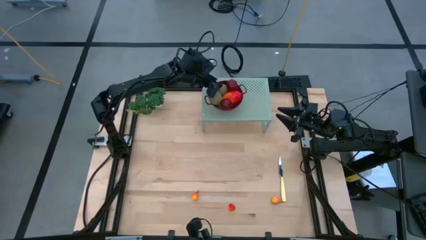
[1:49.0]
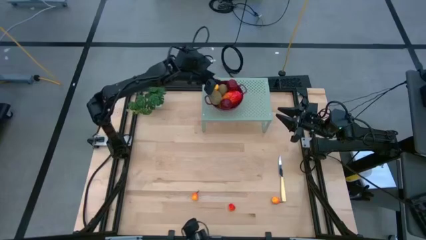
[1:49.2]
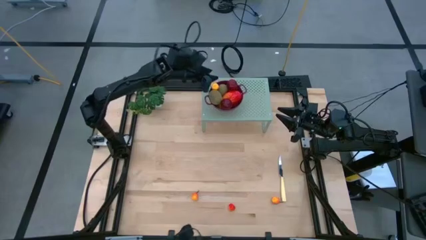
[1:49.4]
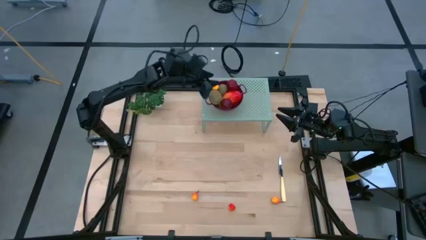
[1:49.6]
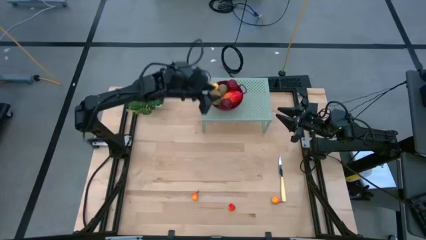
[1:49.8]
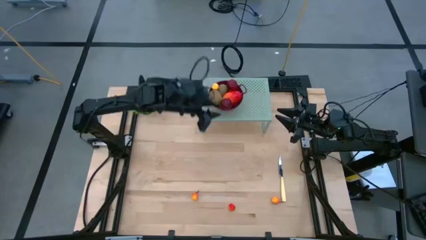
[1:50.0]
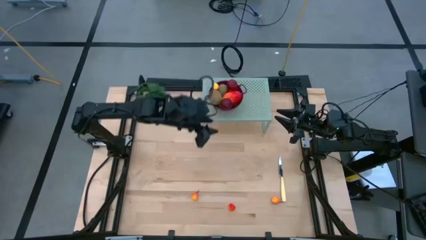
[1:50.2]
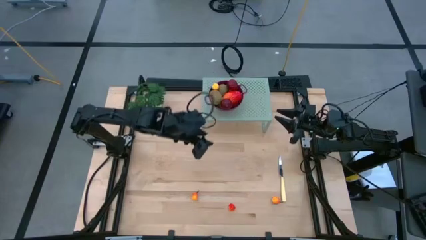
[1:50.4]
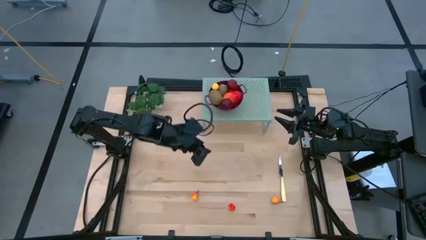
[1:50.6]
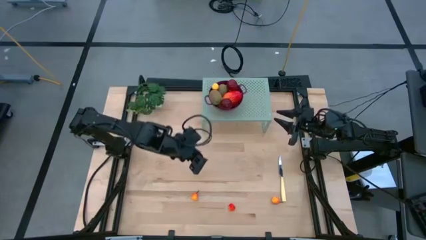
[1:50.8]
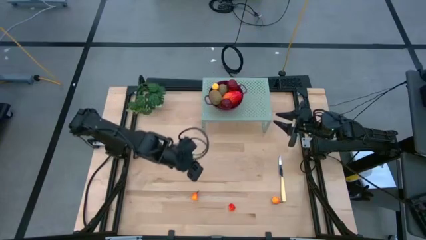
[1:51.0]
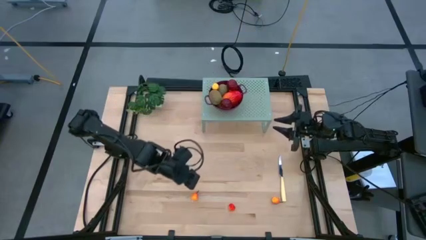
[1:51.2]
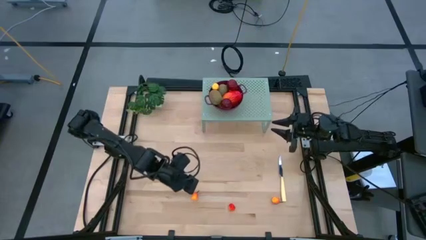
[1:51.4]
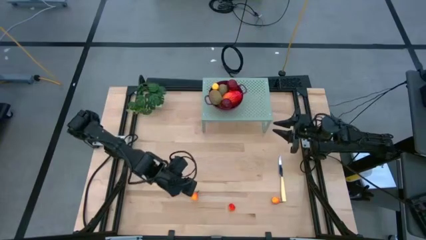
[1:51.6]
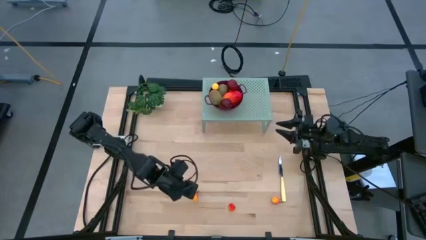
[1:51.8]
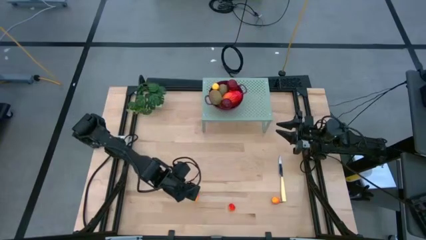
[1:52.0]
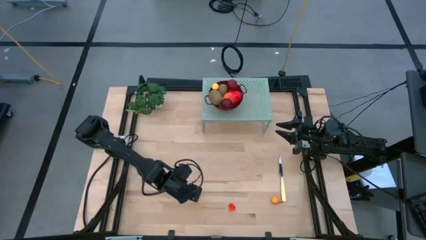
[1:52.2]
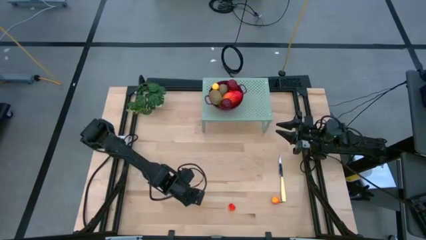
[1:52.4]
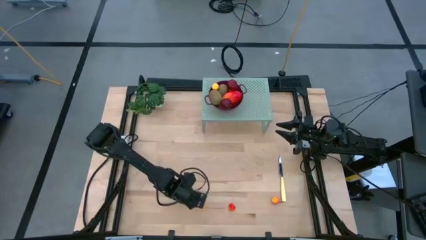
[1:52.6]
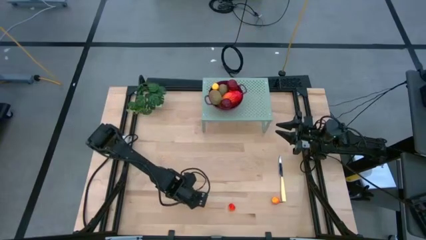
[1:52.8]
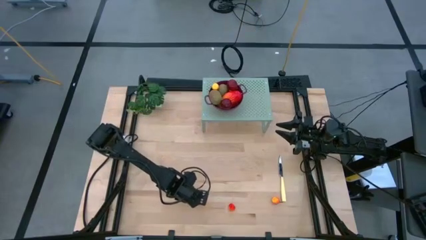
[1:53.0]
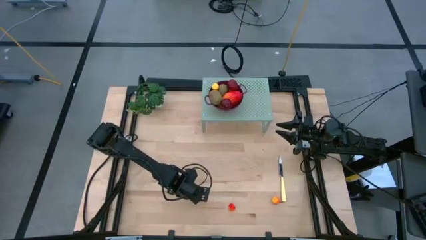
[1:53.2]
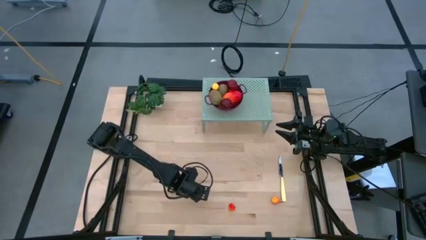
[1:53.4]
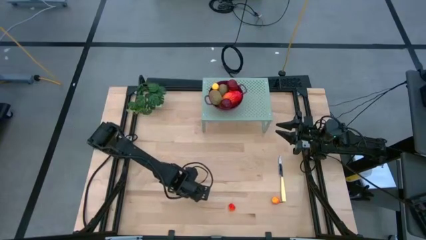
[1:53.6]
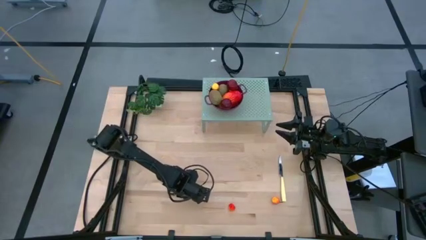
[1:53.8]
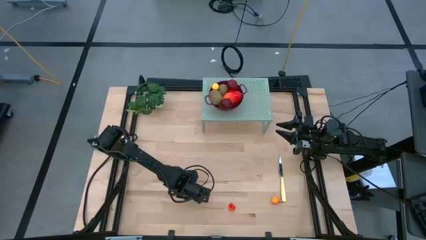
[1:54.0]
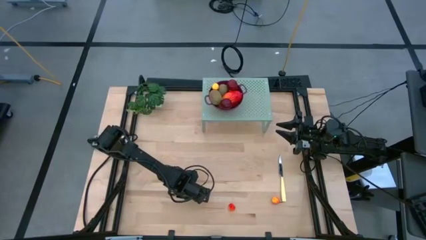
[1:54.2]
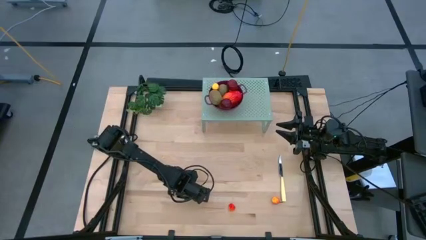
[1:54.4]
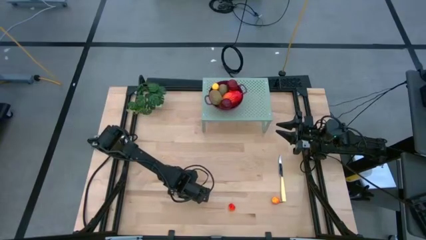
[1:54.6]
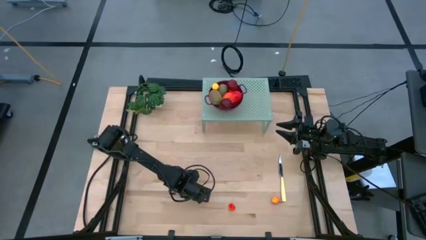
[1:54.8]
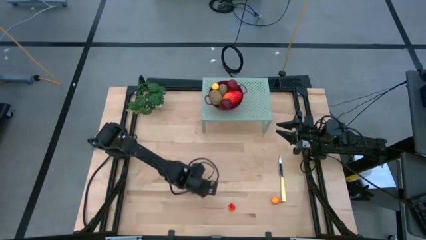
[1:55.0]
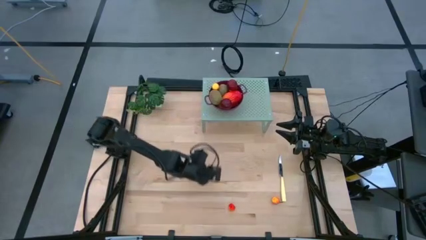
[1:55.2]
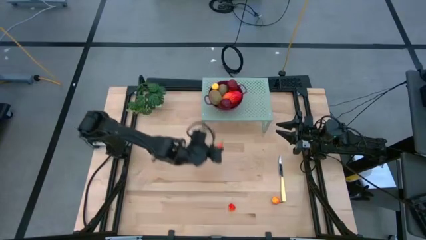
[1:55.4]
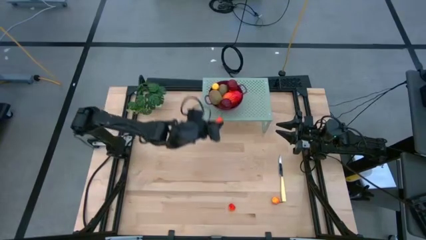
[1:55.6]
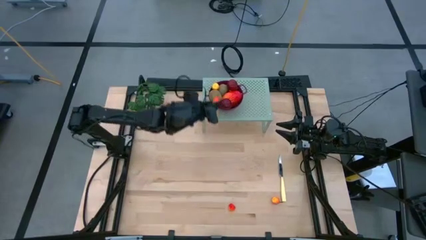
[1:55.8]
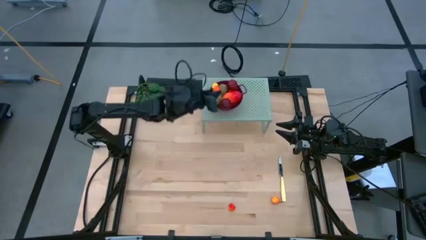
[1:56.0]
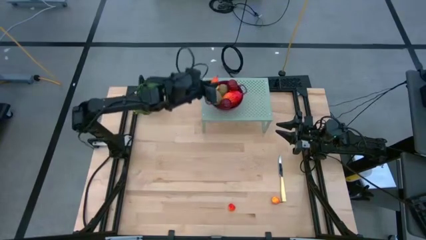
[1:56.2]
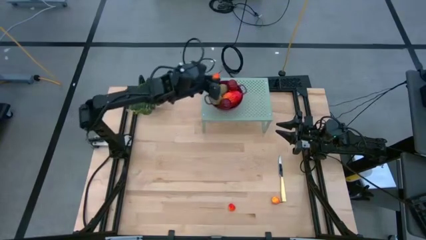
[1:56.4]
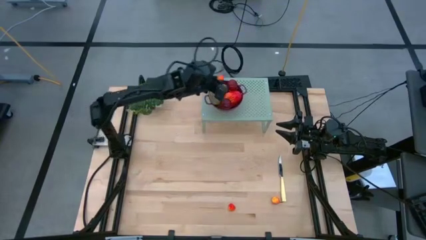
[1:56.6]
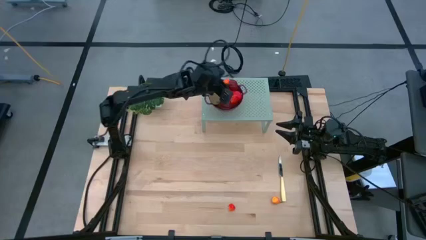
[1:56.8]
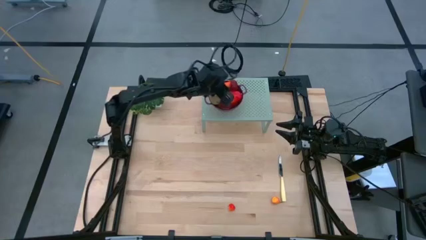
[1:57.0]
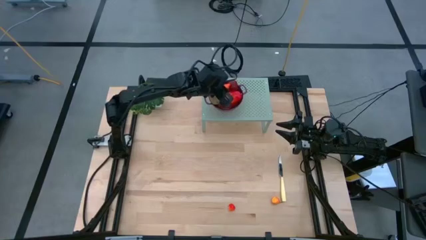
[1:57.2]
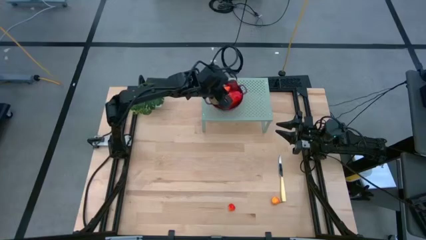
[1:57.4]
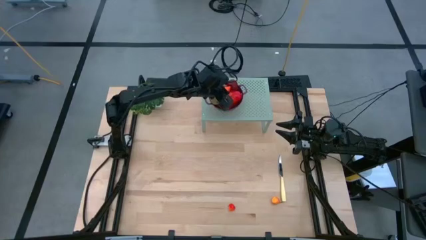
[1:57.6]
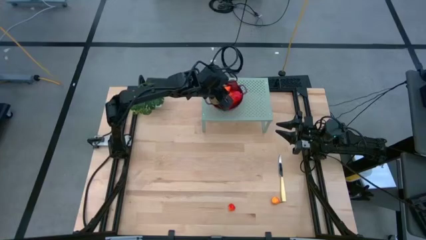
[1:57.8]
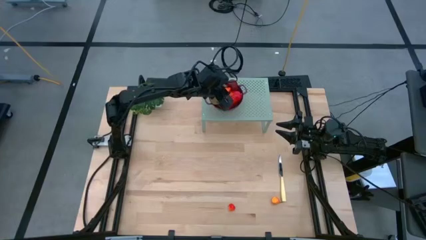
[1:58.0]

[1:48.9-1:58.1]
Task: Pick & Place Fruit
Put the pear in the violet strainer bowl on the shelf

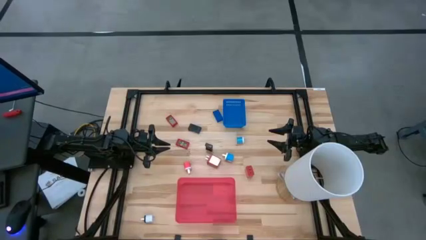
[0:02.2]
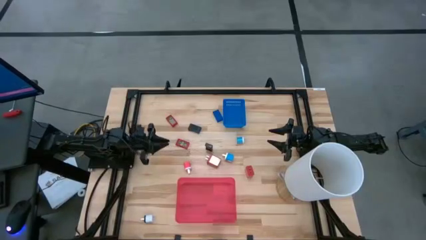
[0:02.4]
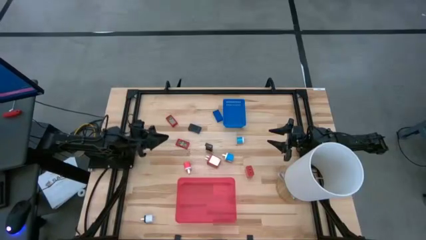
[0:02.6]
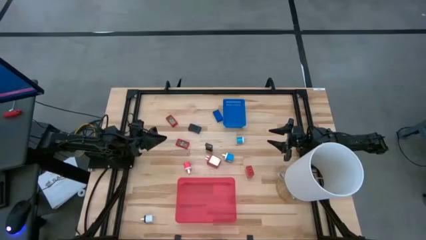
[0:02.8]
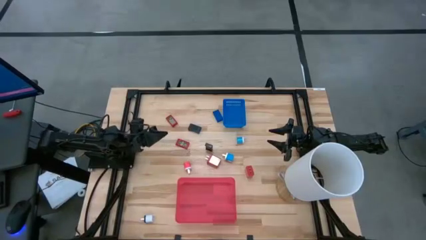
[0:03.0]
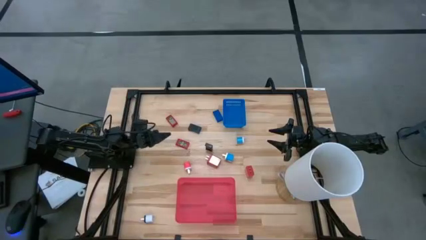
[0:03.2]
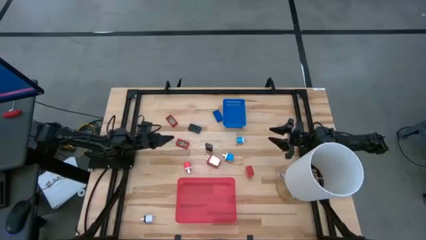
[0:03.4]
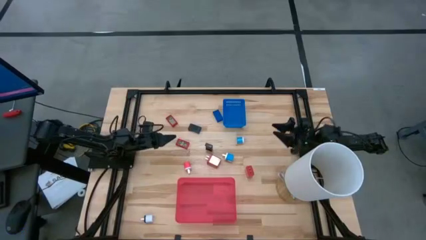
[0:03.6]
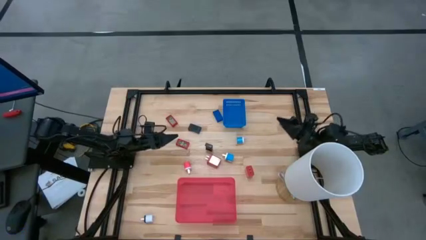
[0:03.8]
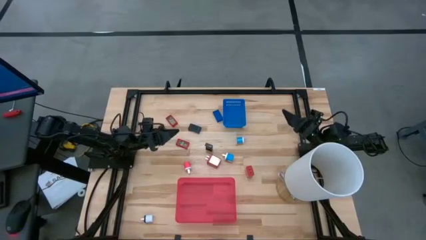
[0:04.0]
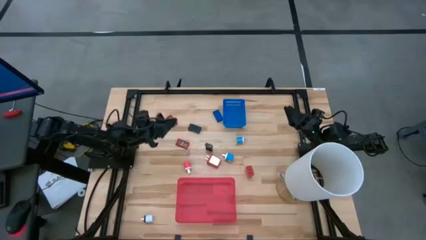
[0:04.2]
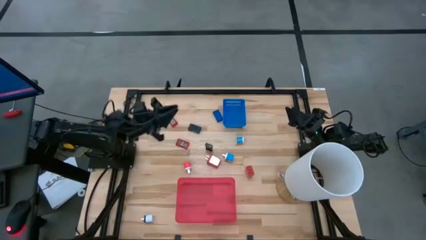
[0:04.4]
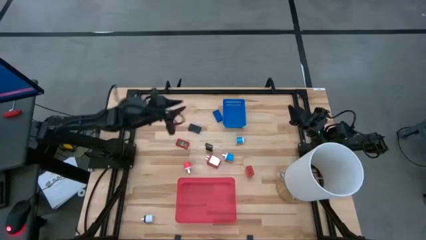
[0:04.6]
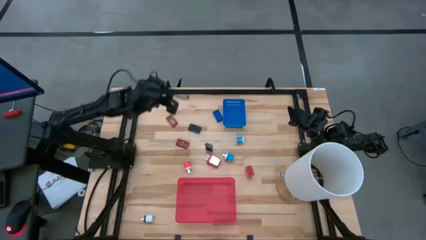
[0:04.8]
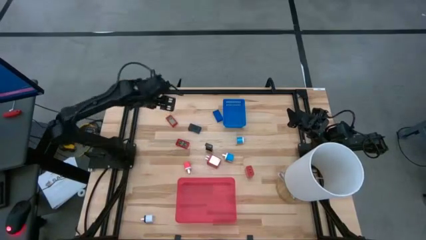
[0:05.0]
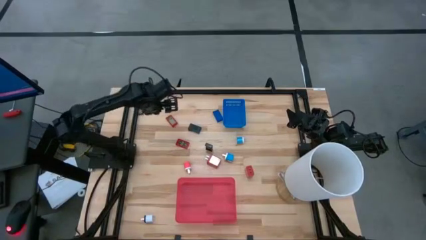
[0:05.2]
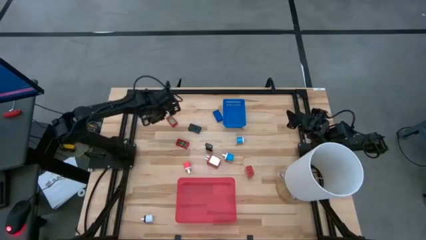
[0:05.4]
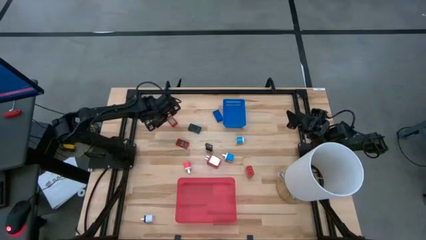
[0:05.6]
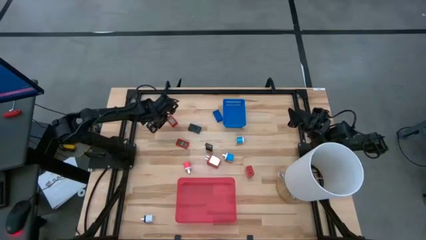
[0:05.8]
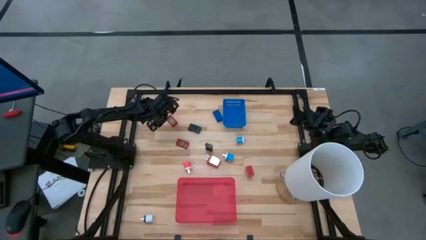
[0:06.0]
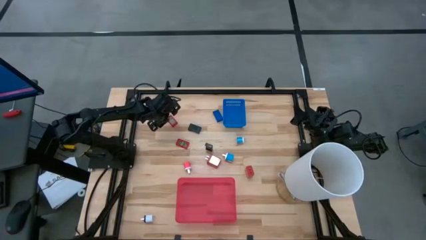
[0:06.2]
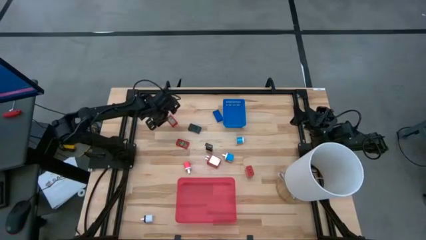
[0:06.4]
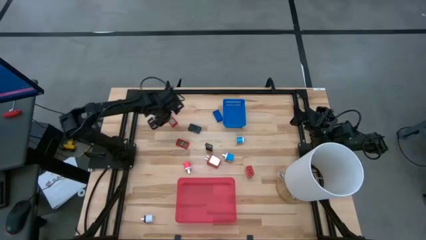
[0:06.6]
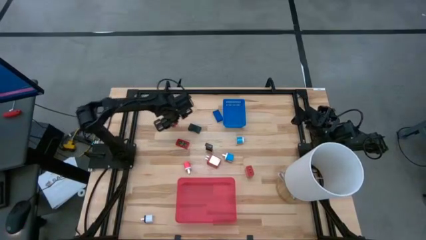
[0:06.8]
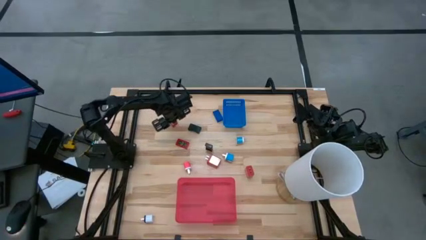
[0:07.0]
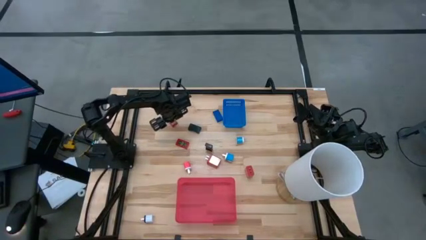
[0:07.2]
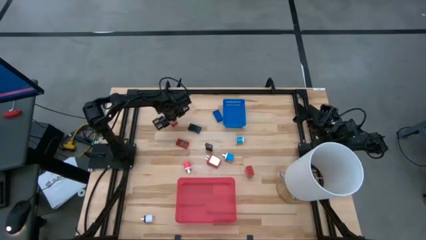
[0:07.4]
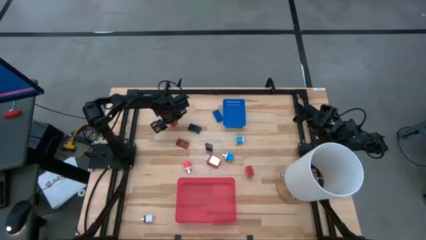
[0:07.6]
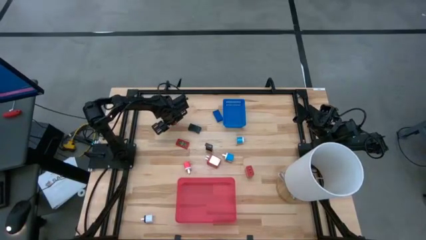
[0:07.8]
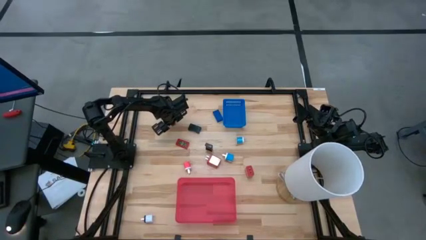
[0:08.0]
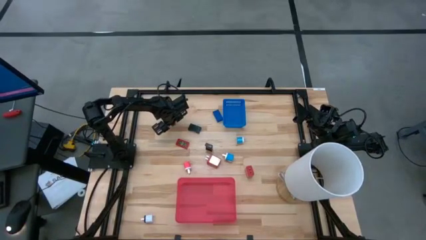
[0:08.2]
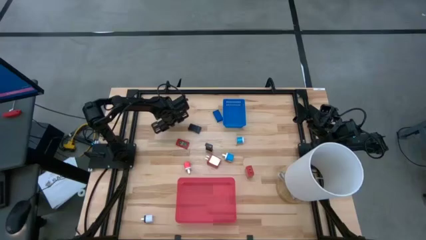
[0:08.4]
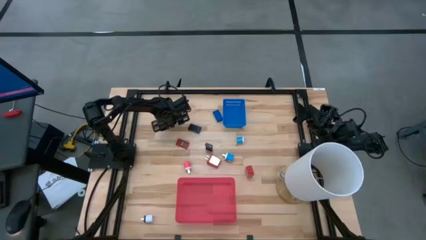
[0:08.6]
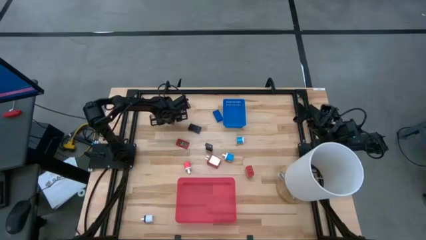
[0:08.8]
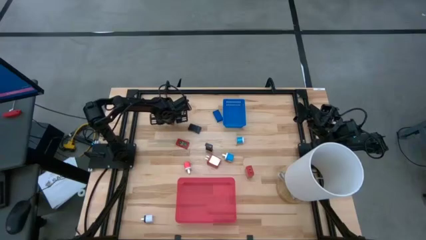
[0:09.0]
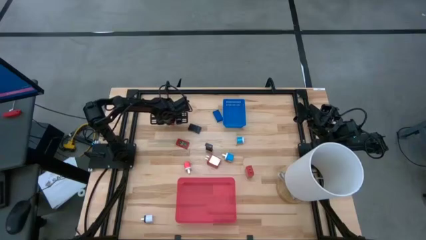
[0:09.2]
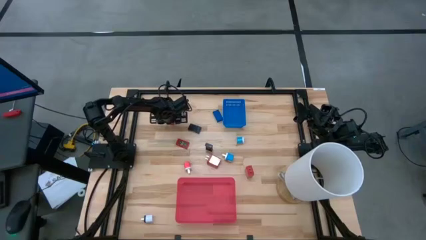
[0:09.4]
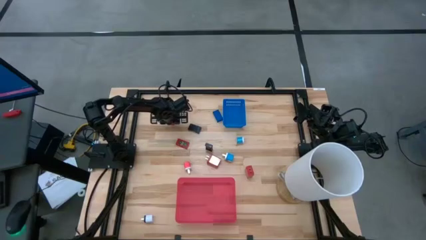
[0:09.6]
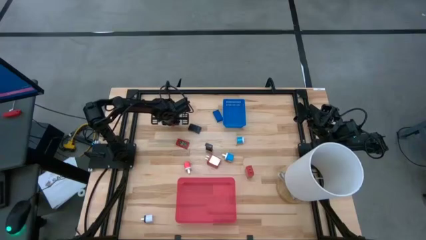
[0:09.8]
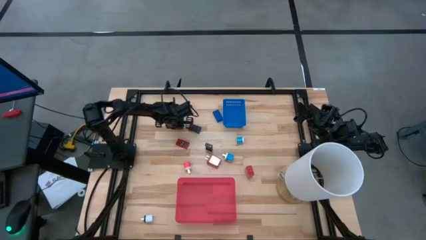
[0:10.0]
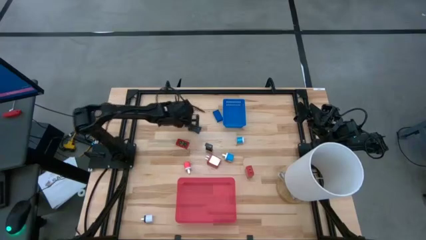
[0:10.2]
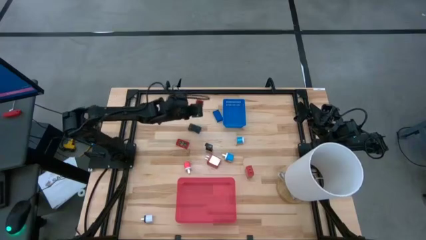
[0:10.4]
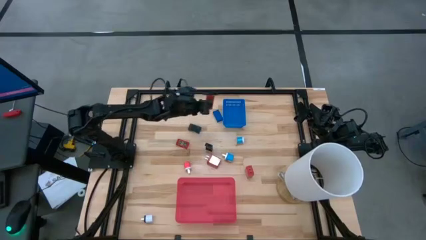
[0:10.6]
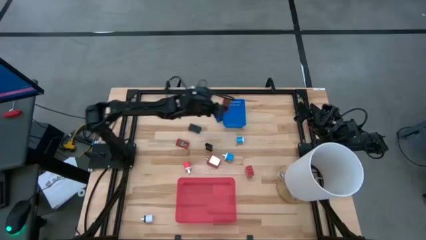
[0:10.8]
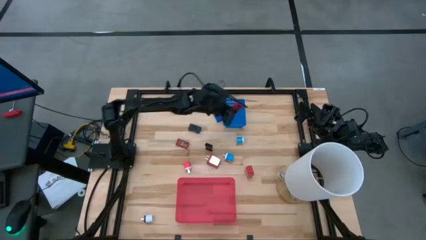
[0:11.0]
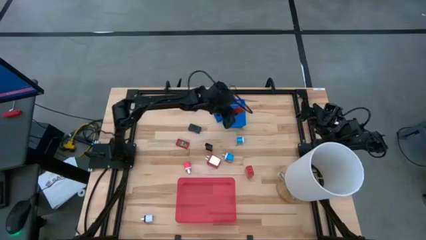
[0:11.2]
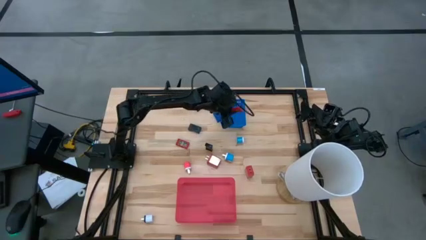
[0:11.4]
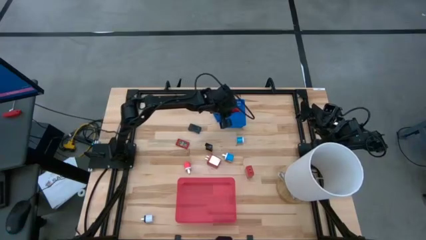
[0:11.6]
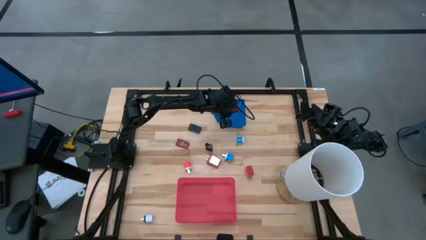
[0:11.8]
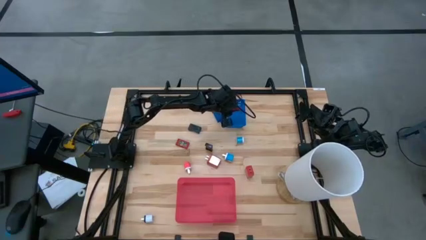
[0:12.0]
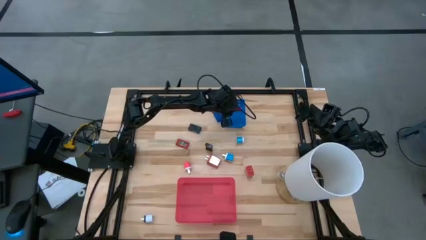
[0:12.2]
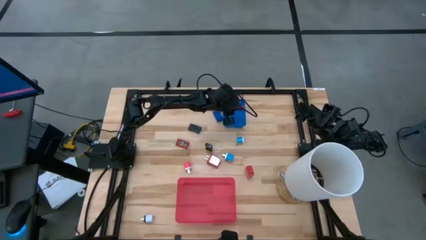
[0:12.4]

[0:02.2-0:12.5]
Task: Pick & Place Office items
Put the top red digital clock into the blue bin
